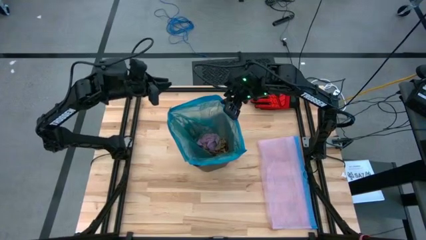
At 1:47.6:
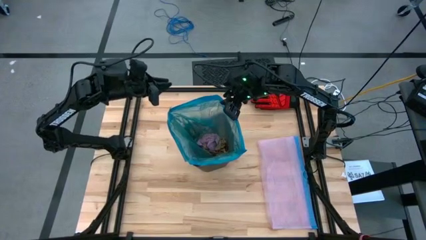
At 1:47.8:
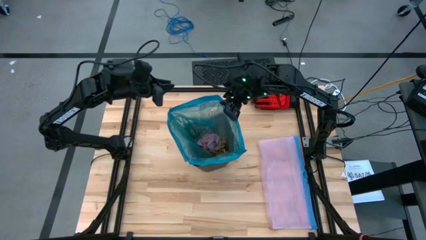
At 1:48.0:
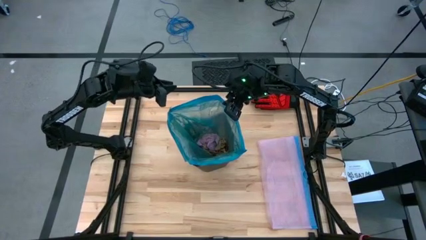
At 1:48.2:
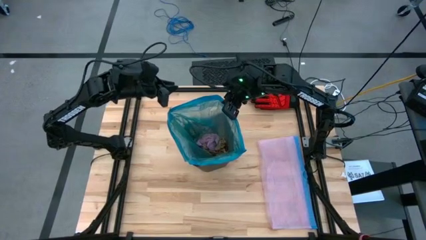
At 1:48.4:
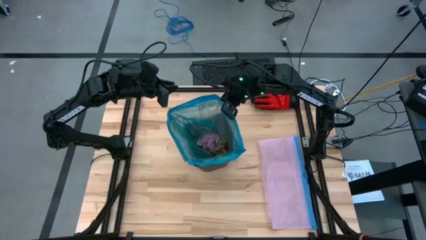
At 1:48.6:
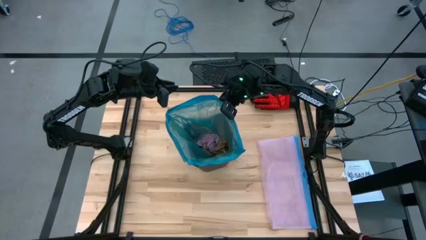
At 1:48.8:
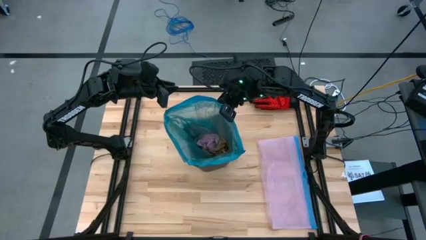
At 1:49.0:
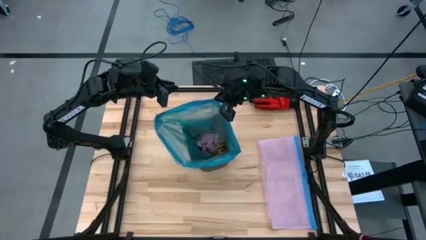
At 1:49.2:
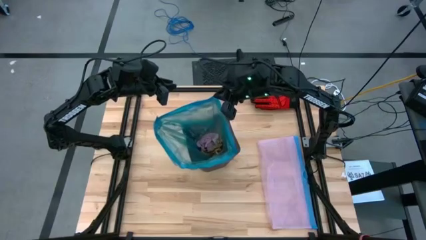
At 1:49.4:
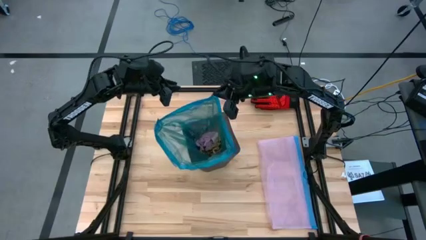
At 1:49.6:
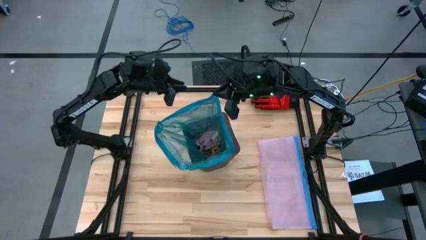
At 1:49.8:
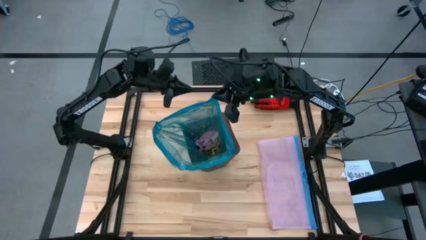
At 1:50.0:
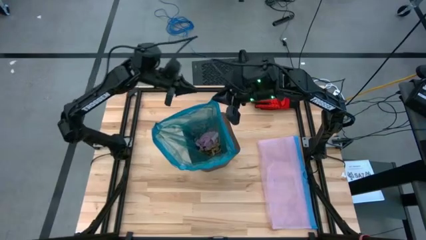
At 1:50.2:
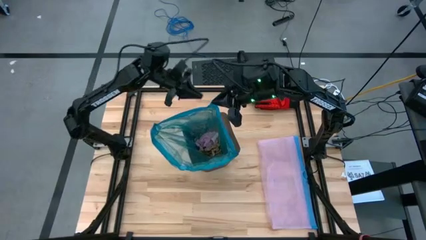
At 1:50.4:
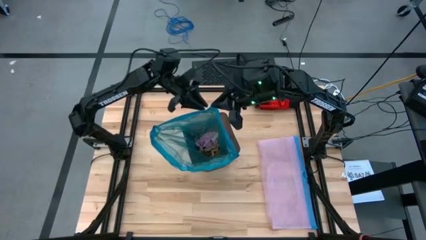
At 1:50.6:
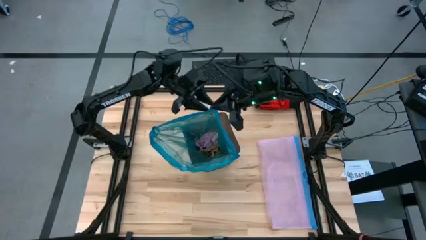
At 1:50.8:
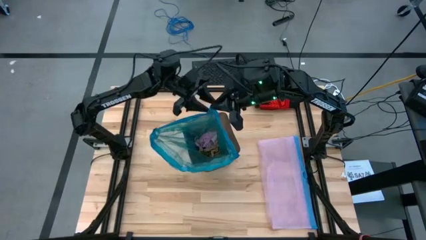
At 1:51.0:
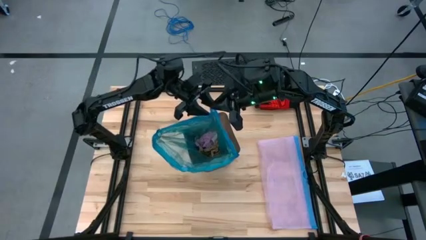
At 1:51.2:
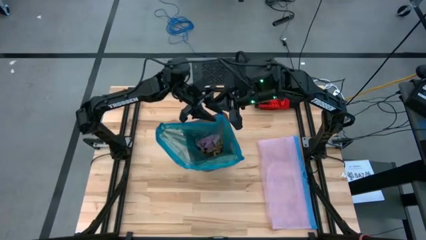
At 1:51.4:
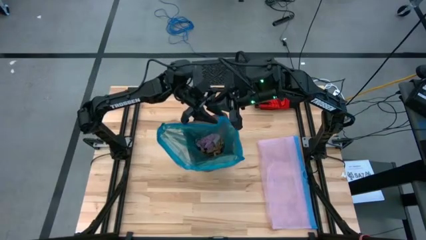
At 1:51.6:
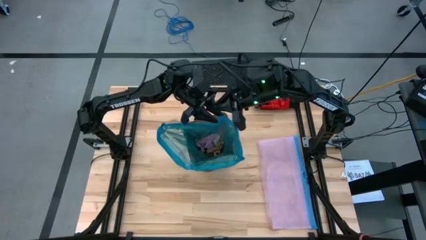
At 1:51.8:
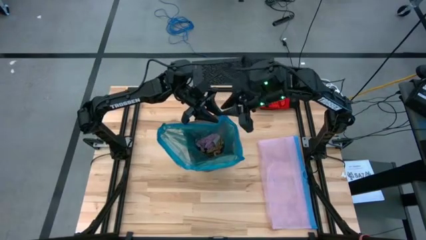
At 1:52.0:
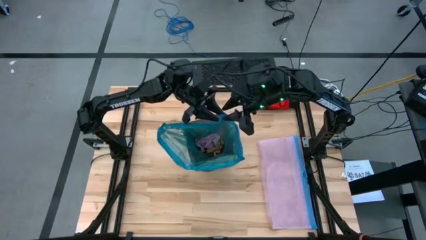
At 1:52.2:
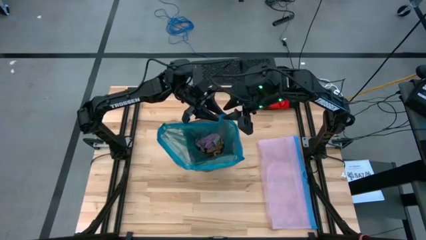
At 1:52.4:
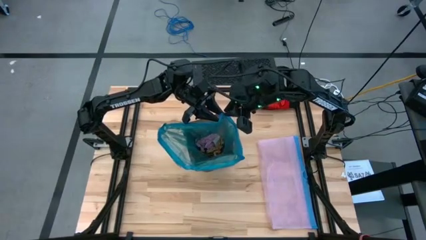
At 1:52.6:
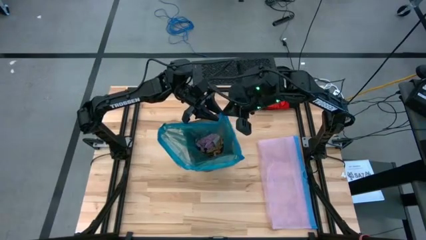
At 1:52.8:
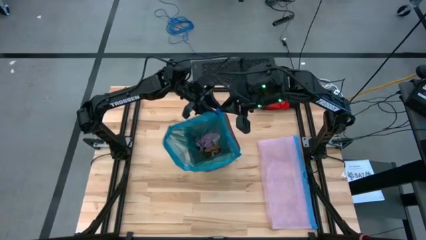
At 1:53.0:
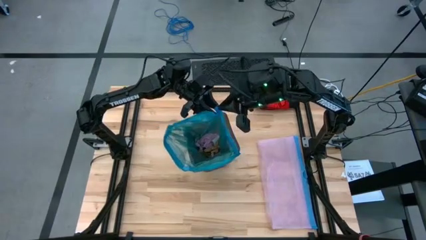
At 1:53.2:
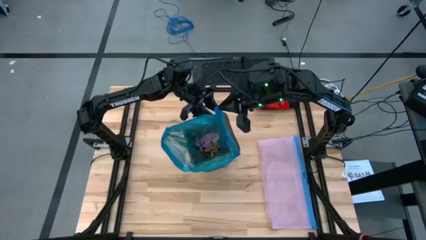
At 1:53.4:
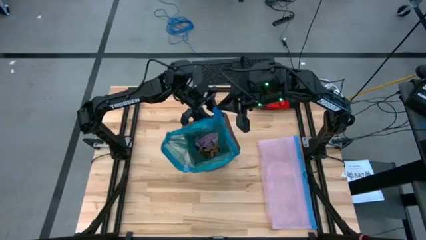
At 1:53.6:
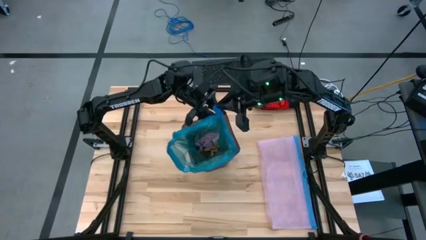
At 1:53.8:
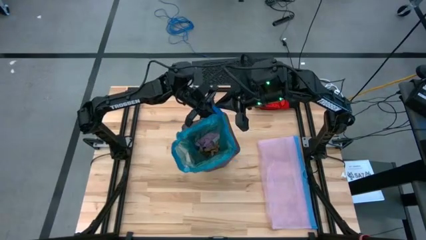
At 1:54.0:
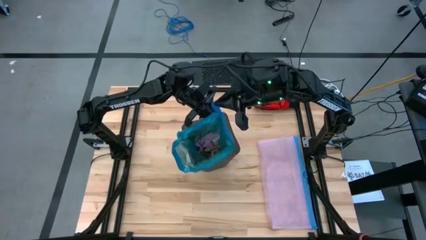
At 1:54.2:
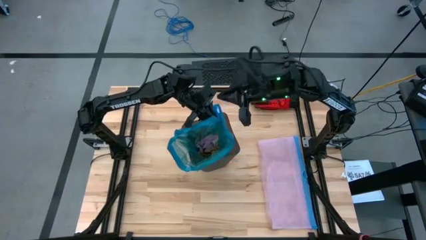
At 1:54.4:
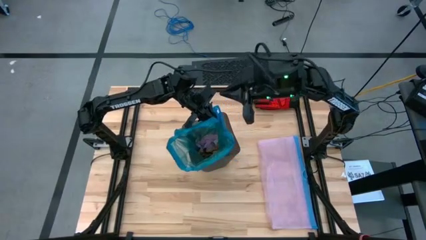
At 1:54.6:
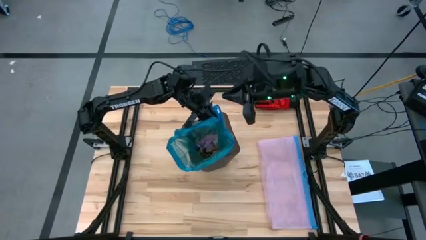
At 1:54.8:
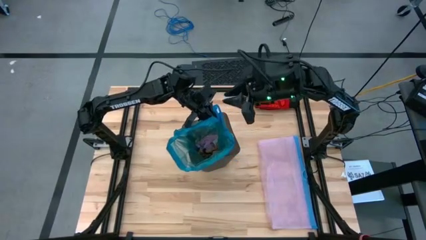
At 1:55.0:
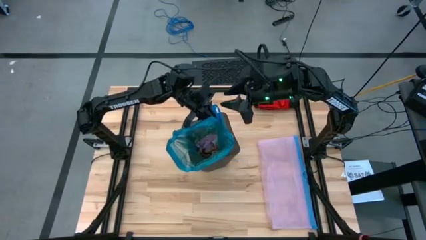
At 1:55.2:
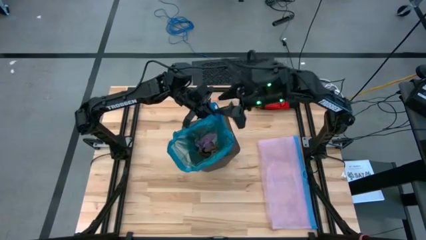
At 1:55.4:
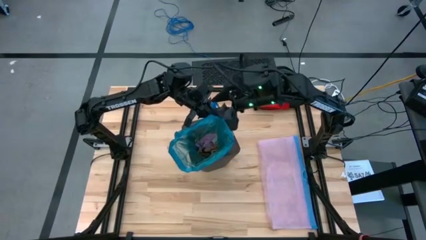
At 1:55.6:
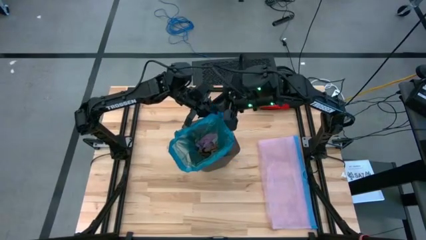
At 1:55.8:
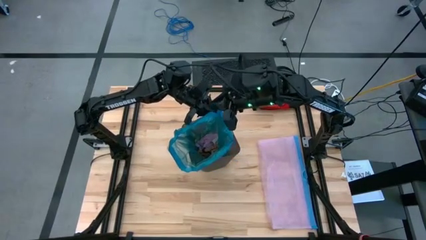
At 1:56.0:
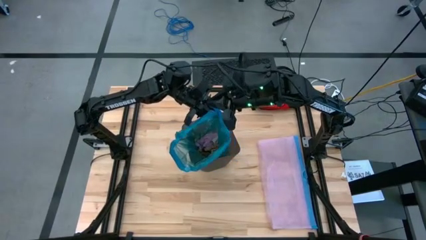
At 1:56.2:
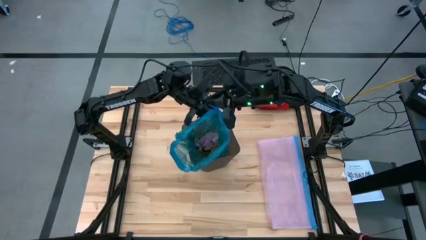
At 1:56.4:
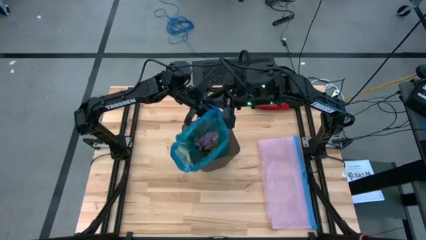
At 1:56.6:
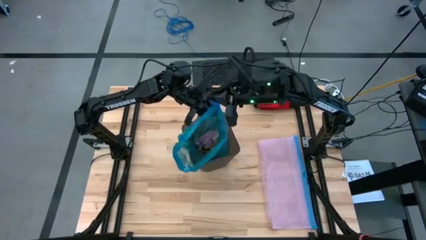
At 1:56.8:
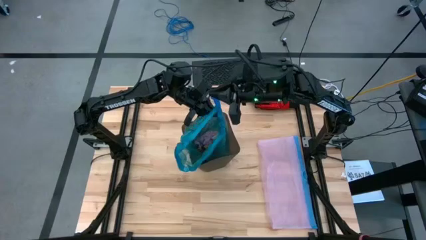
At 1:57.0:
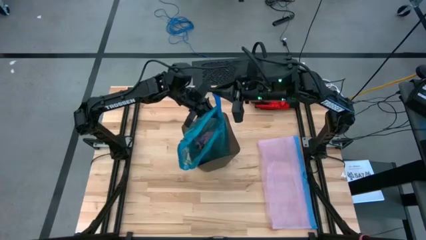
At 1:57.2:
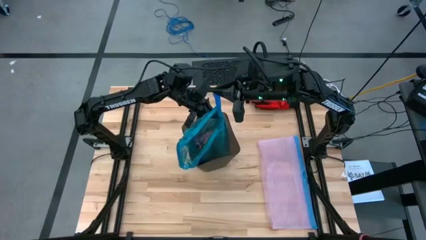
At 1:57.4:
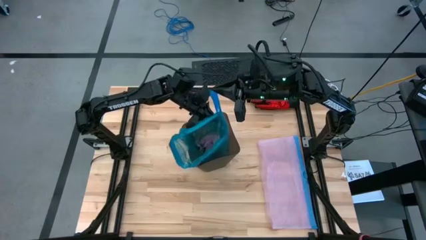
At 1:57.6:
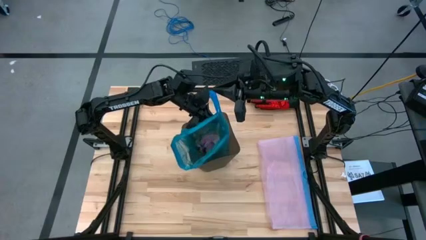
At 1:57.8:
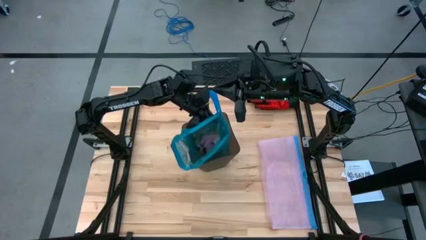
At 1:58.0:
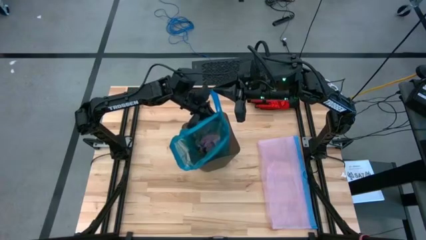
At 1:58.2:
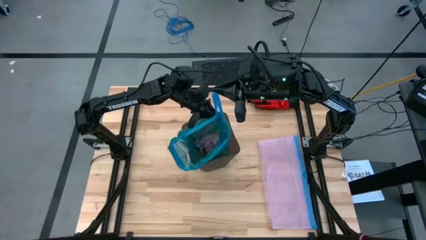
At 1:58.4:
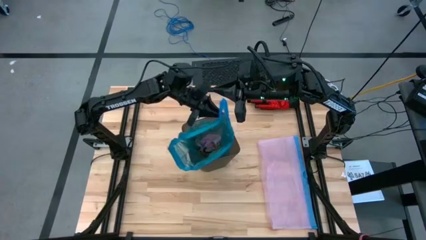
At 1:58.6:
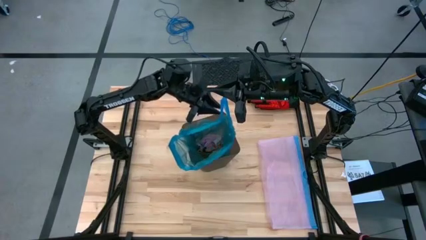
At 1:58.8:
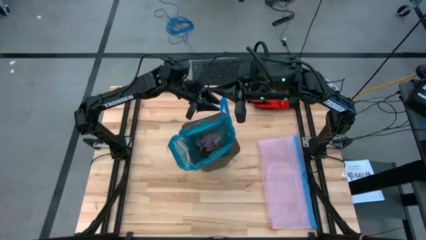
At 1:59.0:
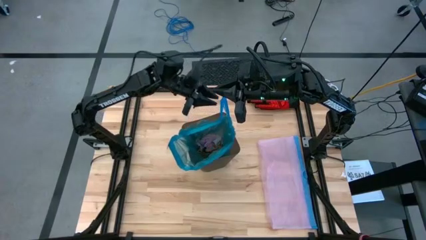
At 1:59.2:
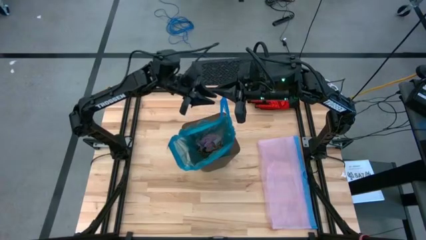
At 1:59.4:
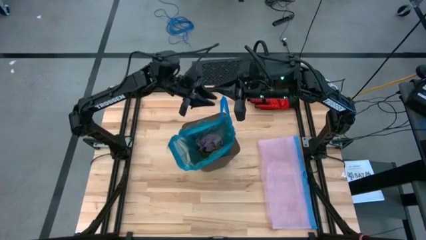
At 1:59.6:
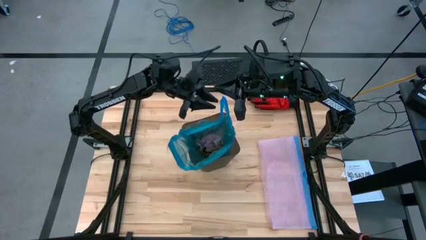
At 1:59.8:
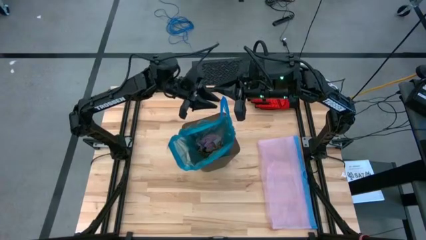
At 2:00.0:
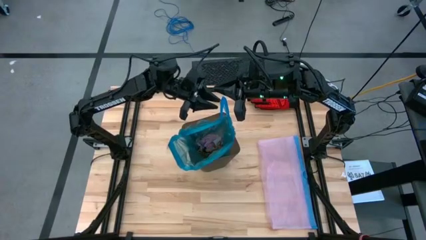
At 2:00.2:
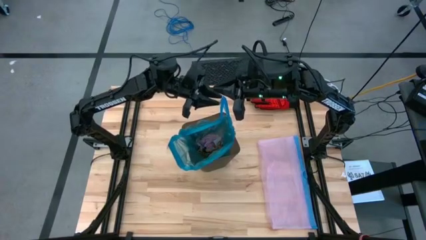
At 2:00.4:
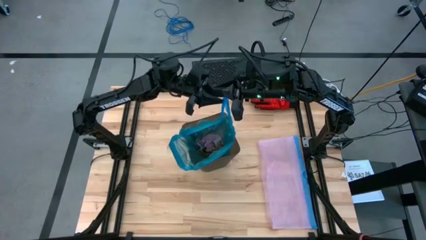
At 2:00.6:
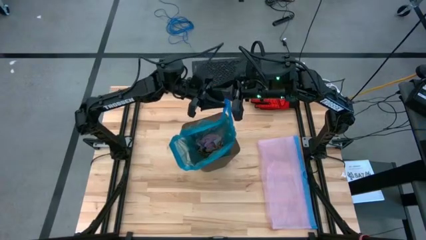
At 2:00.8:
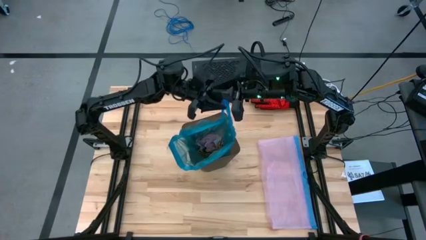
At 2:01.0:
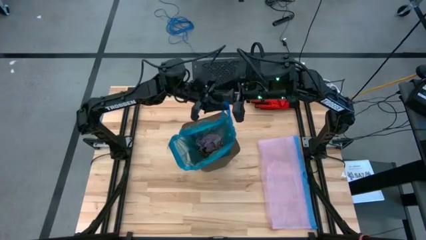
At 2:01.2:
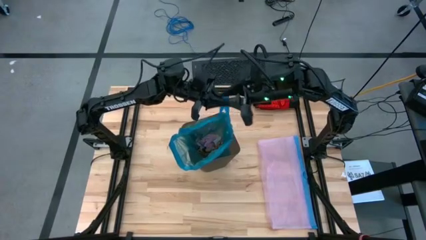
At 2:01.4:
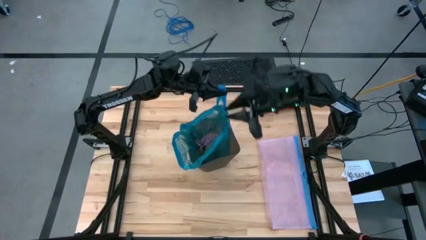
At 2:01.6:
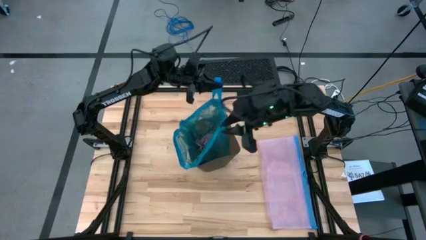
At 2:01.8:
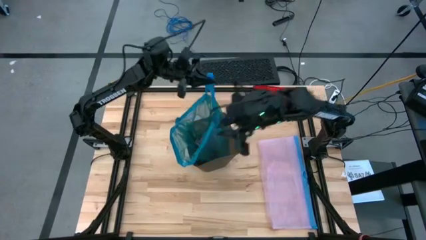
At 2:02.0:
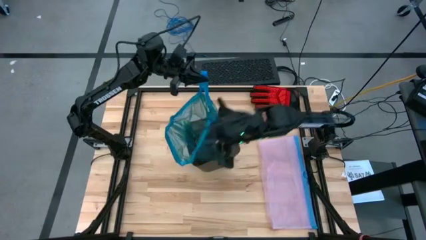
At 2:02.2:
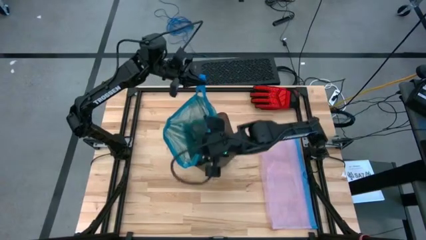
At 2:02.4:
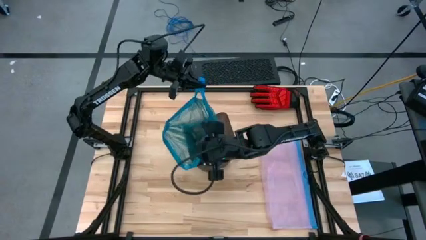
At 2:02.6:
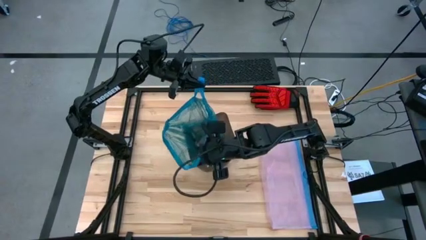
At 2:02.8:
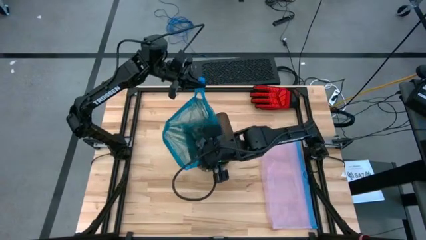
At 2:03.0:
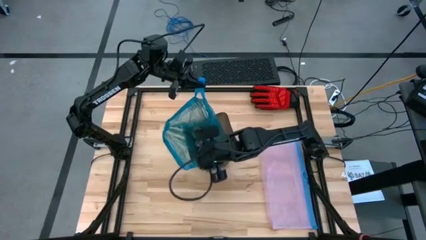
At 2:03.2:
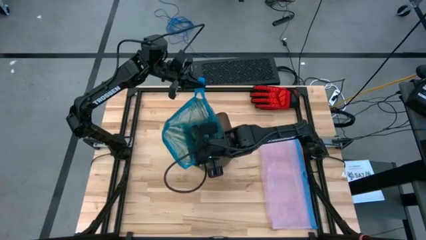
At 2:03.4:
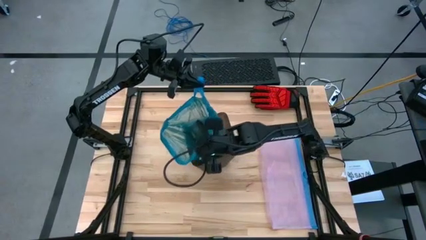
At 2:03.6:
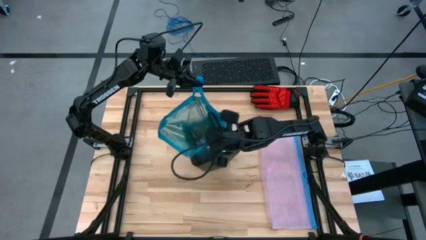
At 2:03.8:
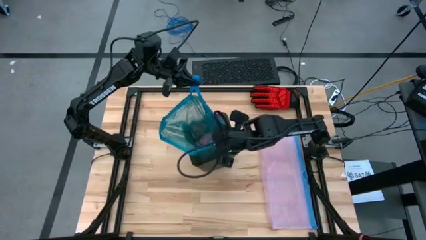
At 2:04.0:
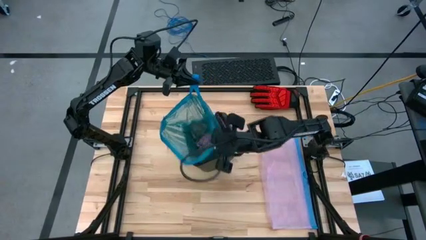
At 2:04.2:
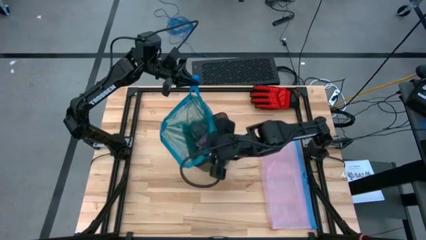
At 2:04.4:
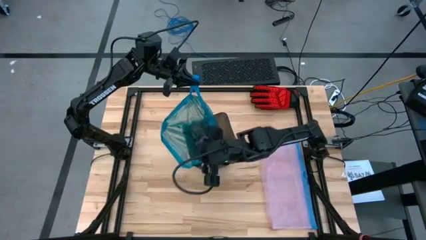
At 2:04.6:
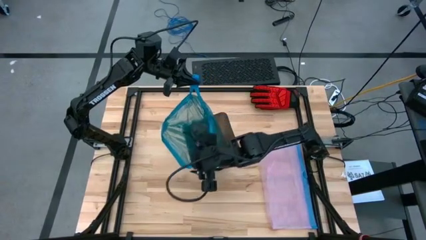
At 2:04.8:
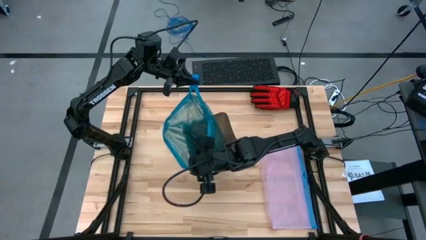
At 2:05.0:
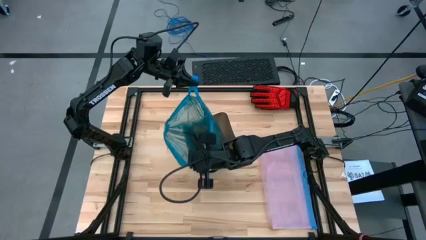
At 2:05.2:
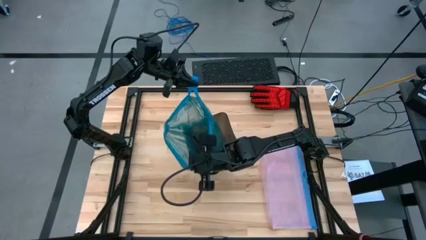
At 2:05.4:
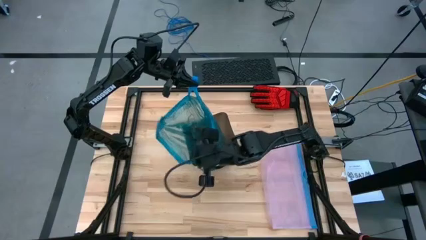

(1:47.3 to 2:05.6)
Task: place trash/remove bag and relplace
Remove the blue trash bag from the black trash bin
